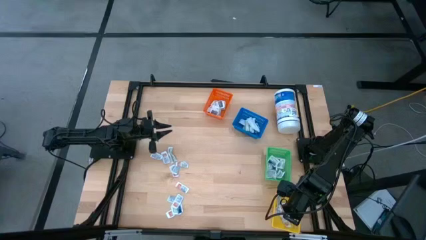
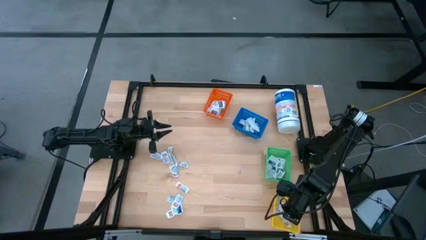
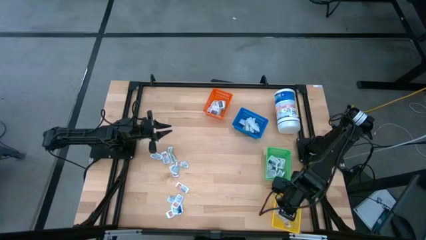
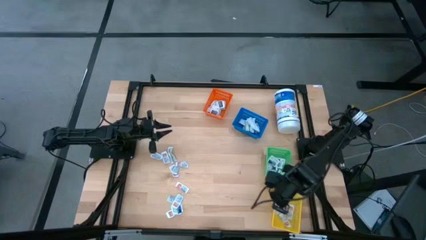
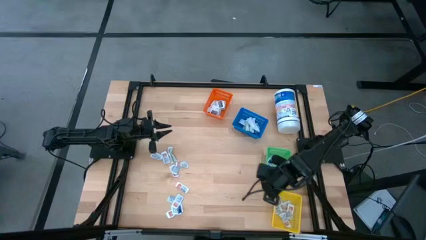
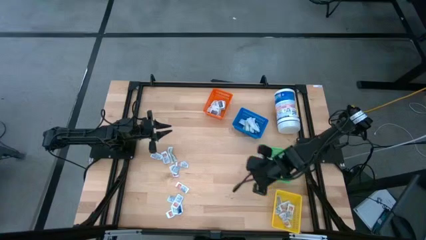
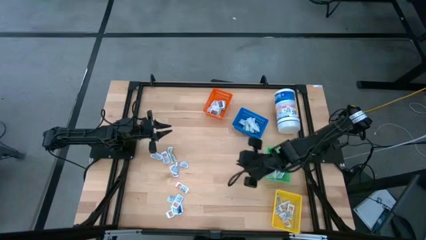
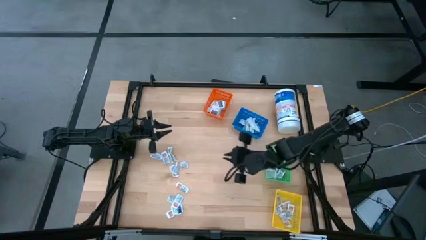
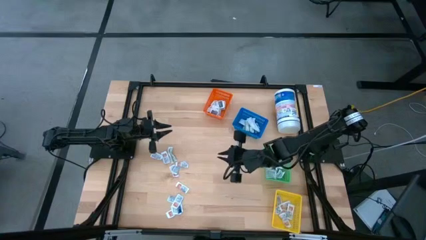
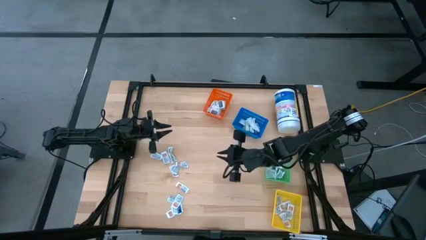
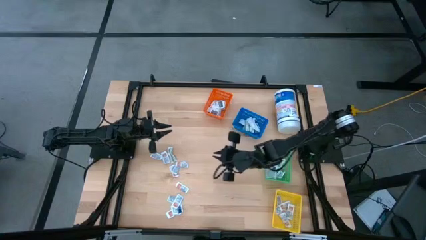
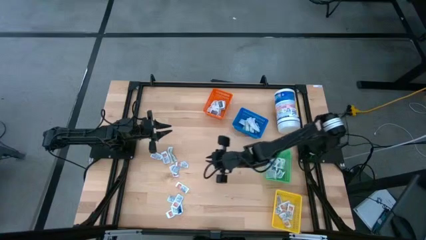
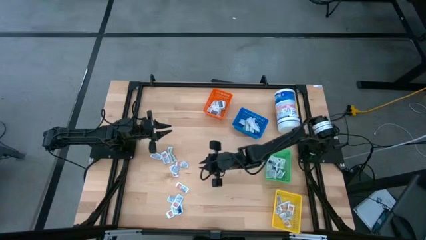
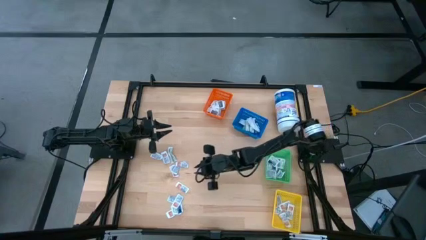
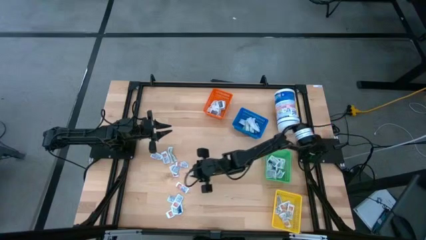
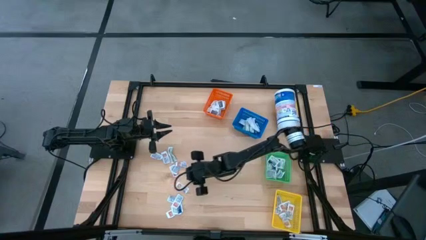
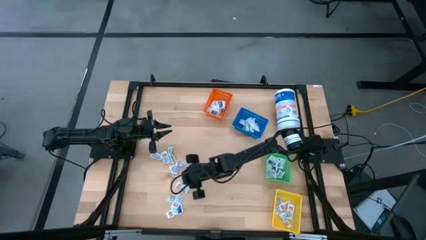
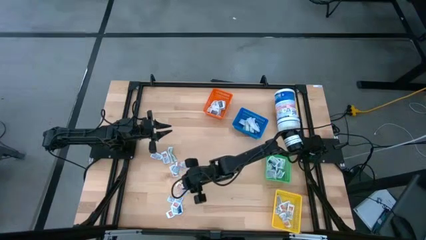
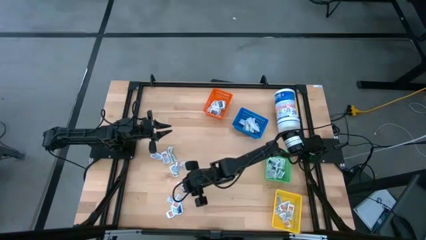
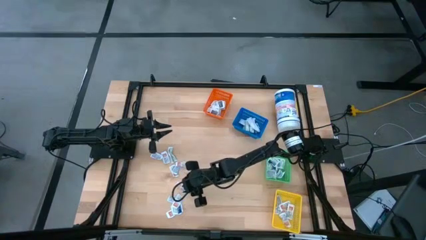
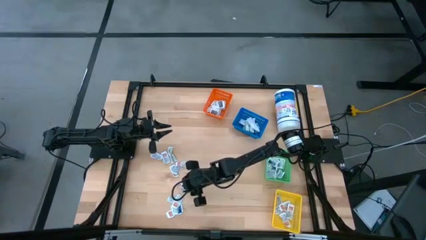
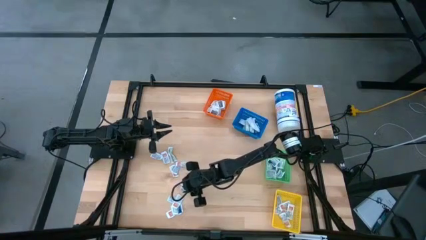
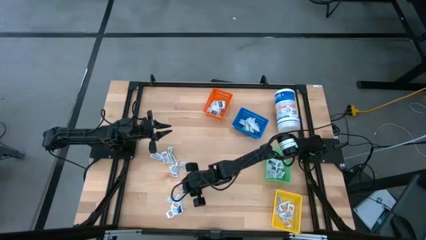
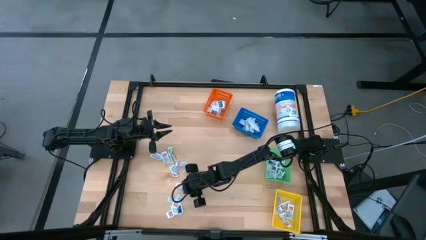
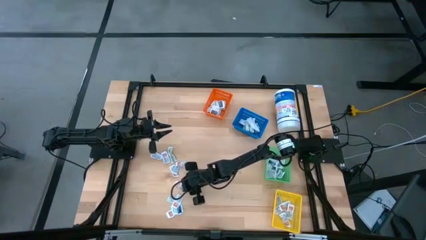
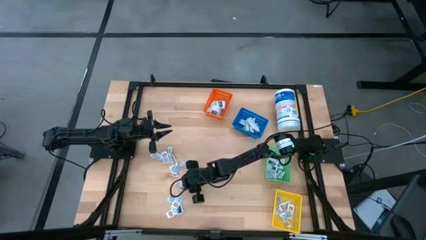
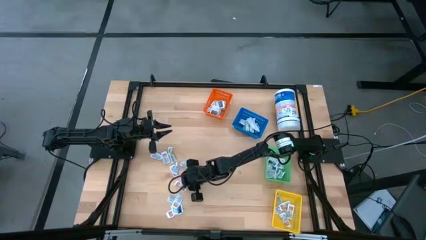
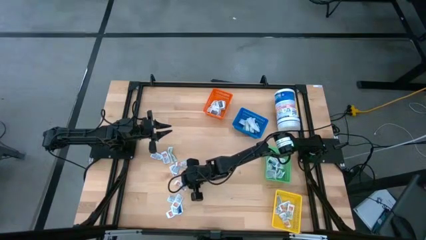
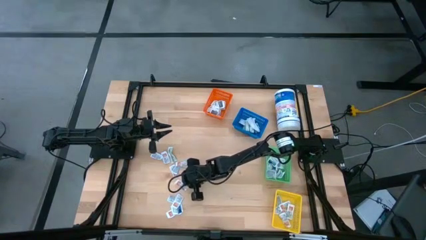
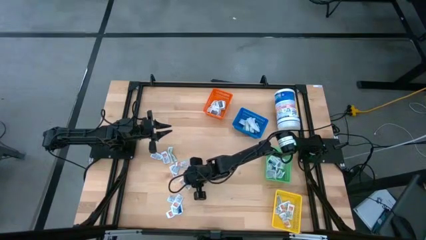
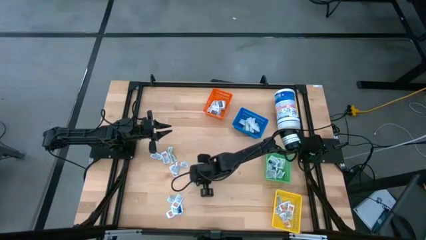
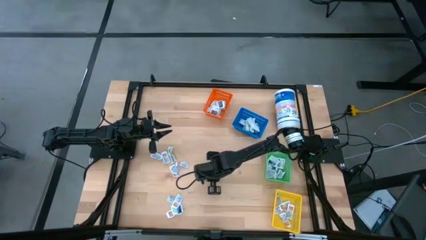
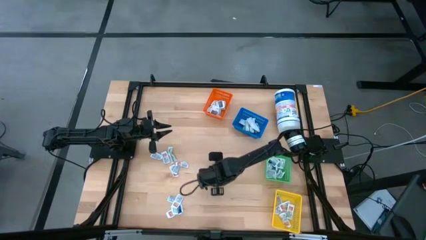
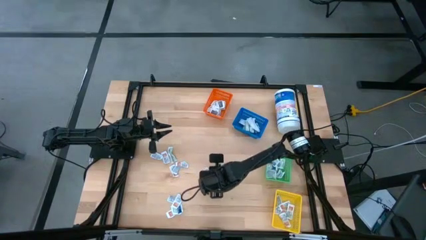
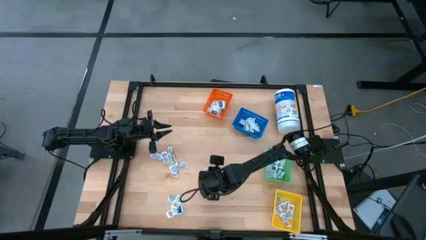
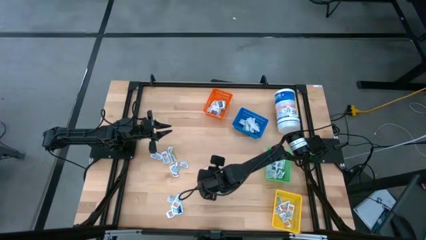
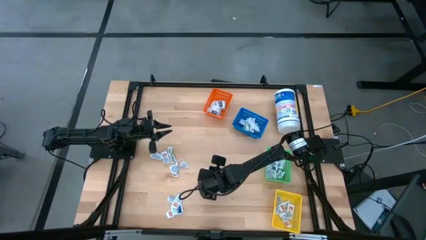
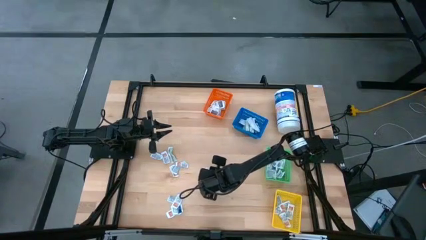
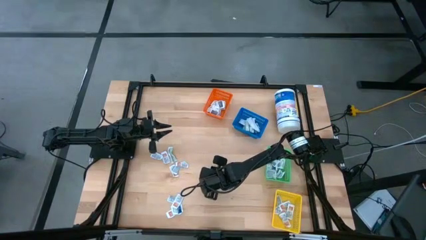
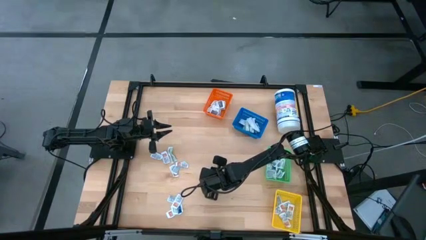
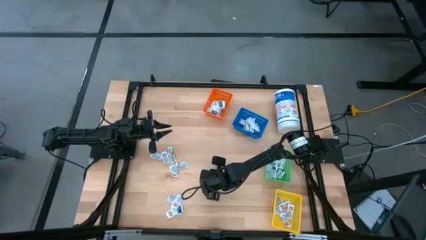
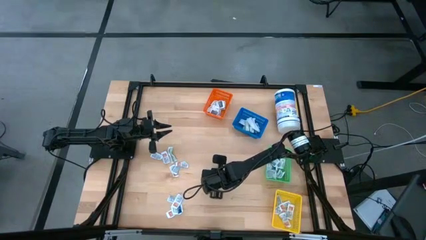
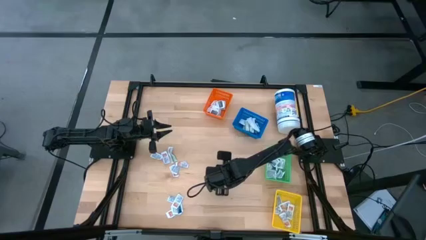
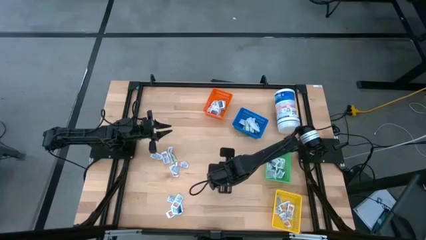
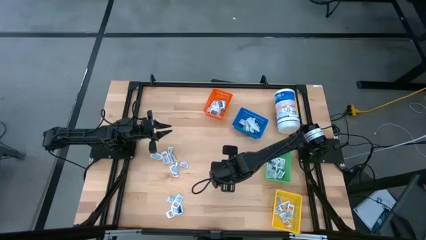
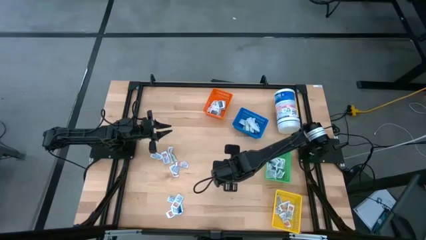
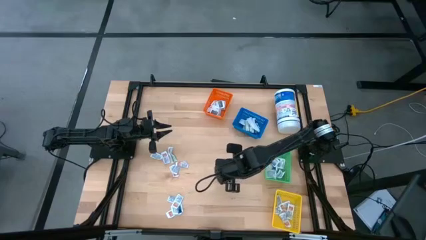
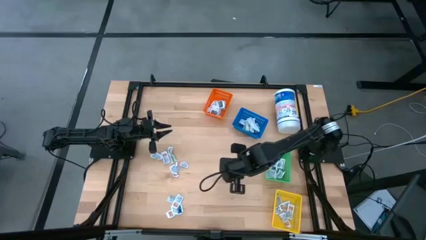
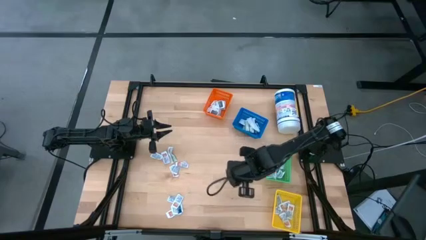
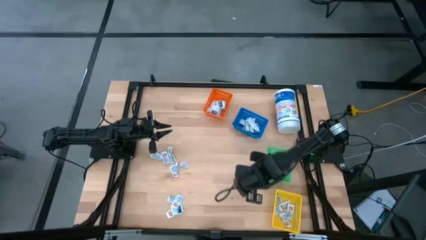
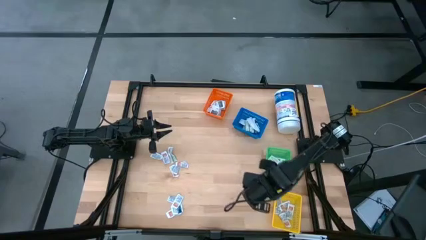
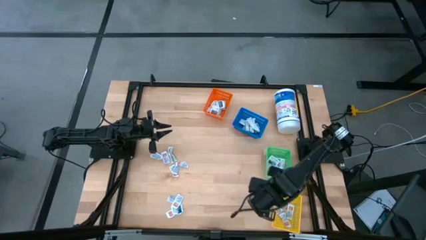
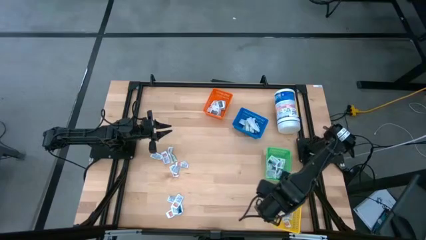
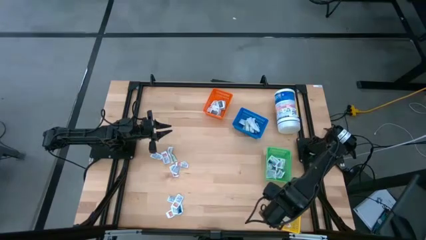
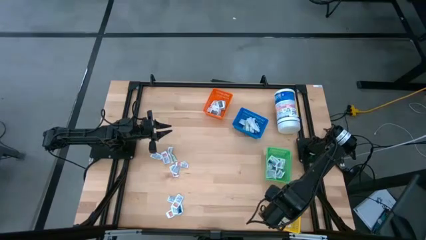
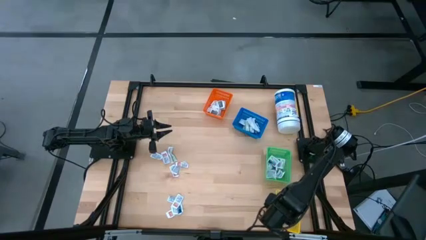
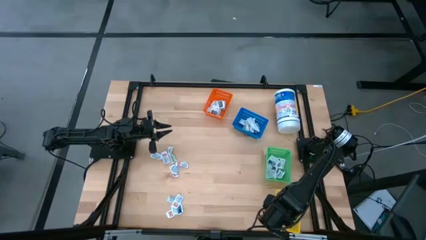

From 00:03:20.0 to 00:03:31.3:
Task: Pick & Place First Aid Supplies
Put the orange ointment pack into the yellow basket

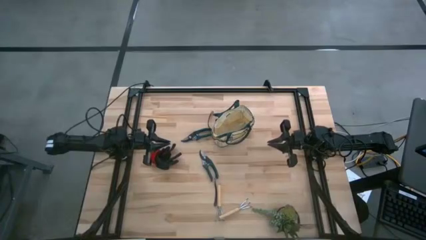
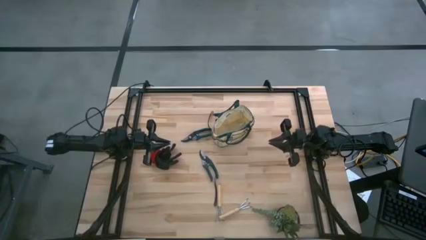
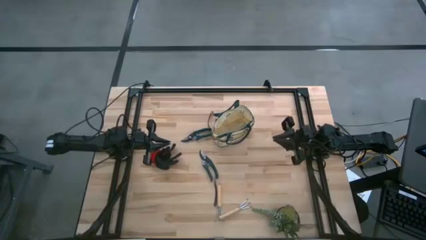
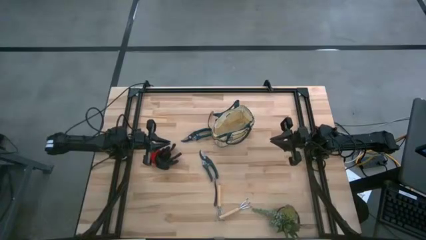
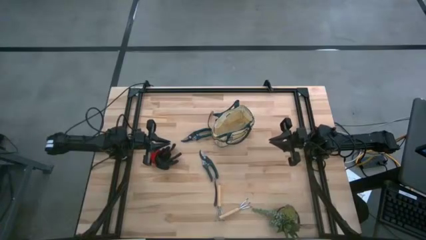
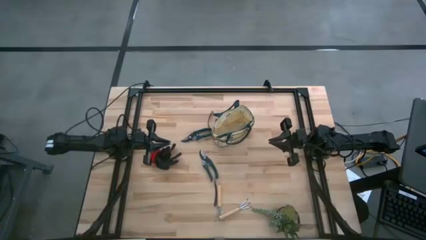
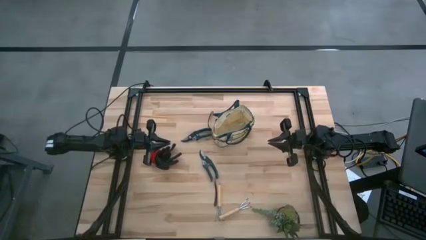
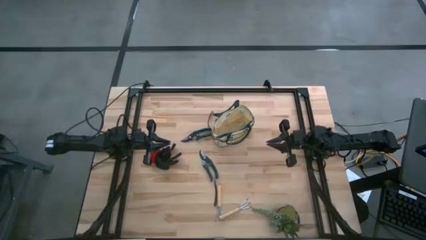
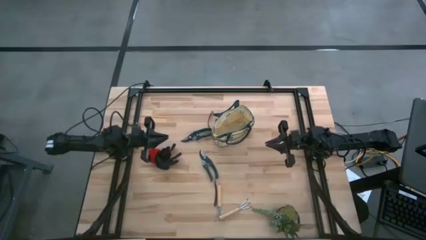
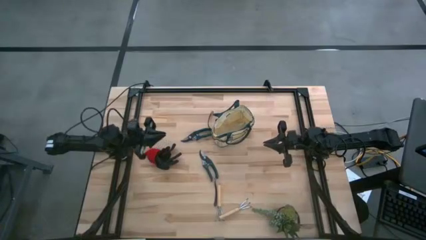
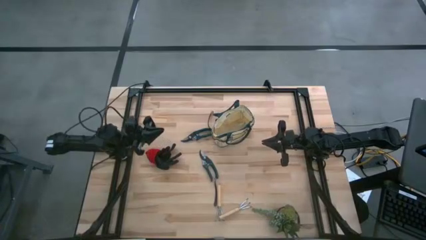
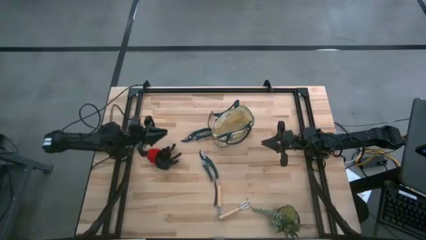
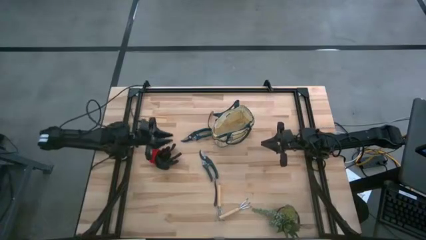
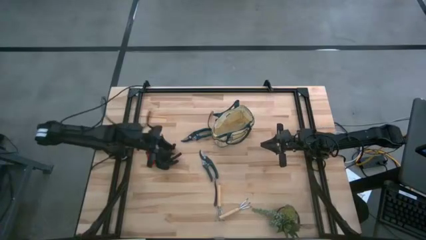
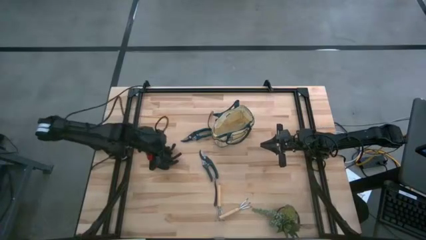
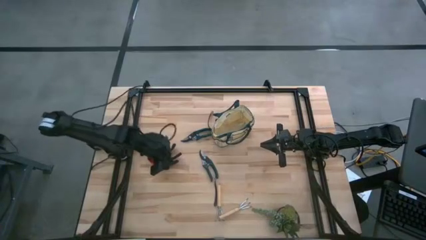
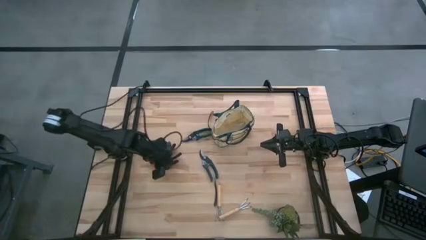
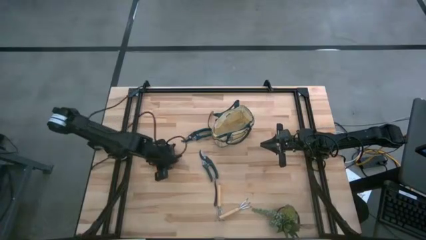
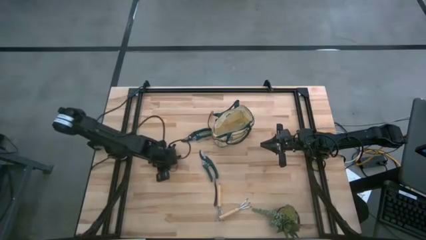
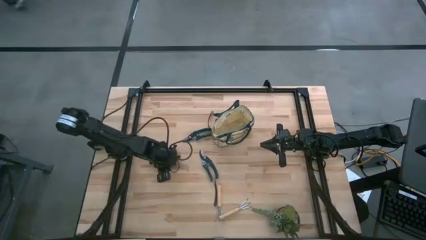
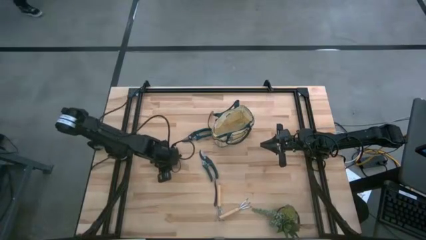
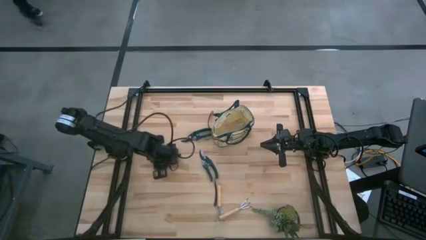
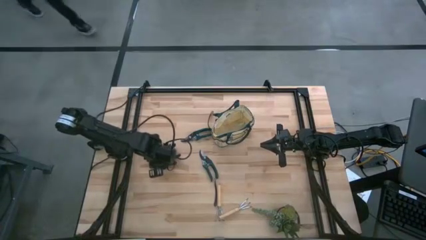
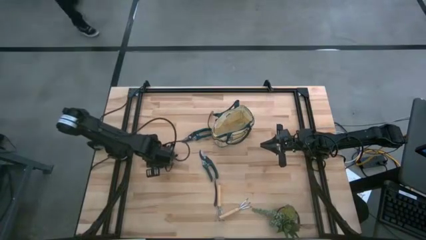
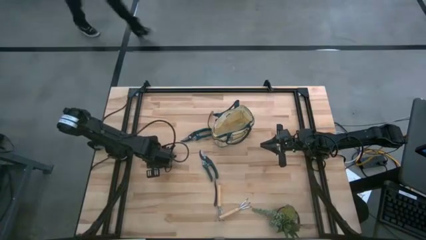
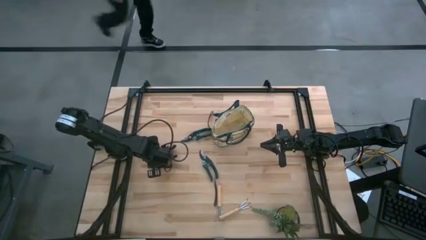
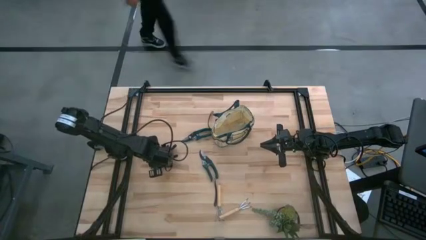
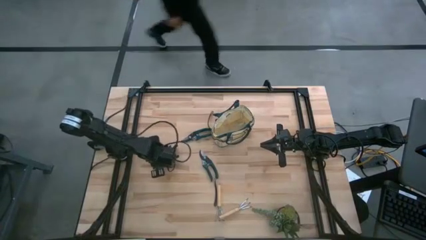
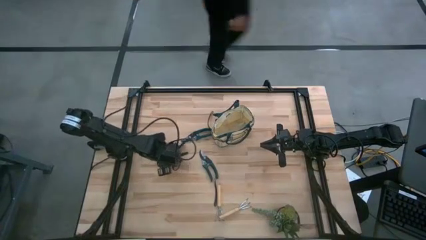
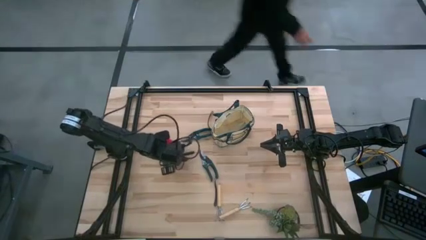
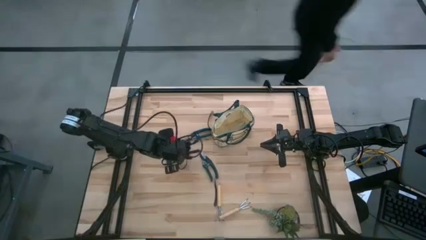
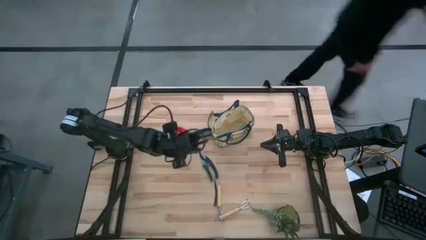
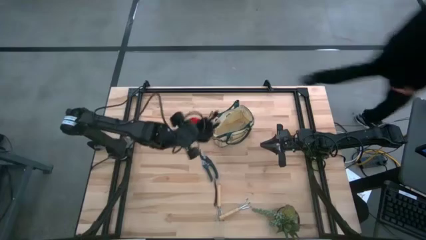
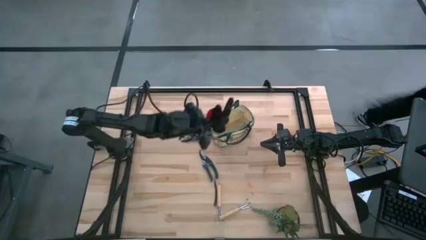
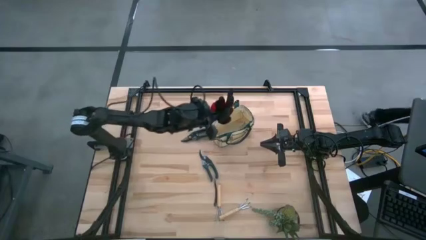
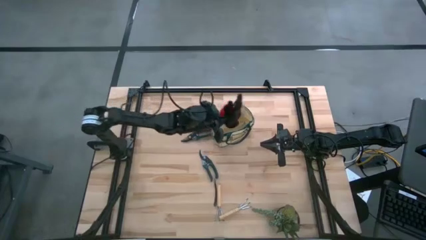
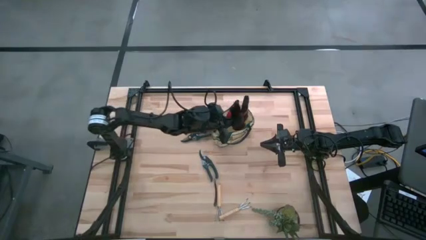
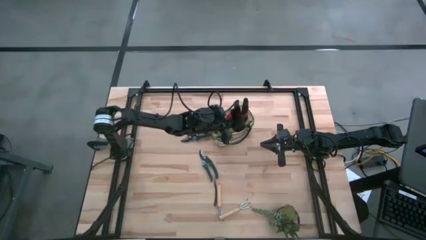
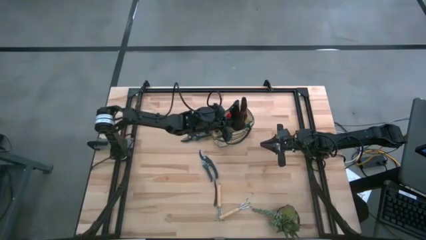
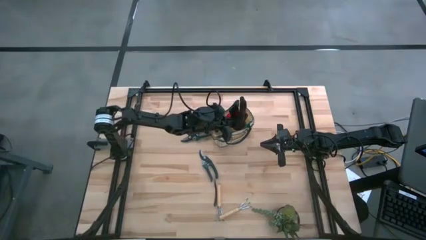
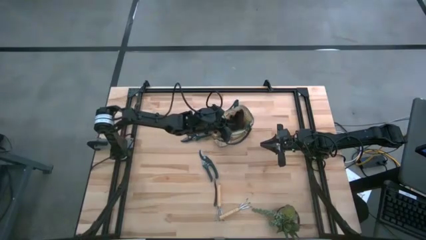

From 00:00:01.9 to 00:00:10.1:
Task: Pick & Place Garden tools in Gardening bag
Put the red gloves into the gardening bag
